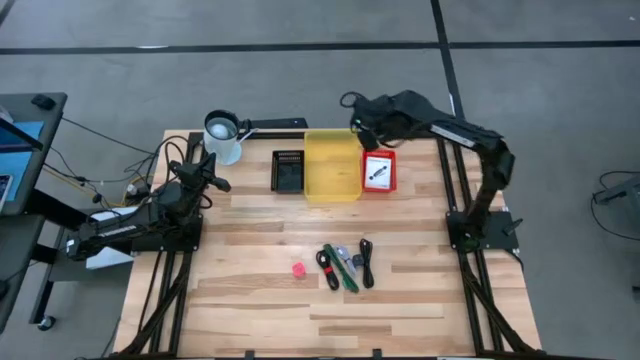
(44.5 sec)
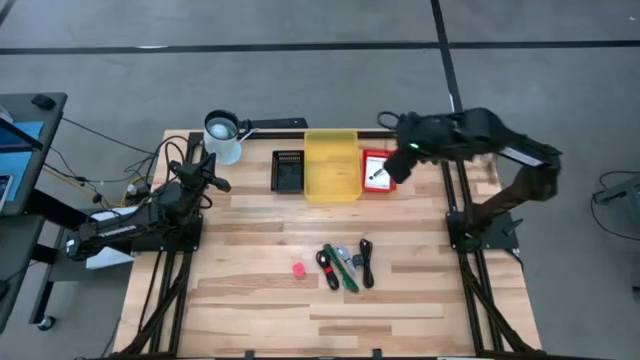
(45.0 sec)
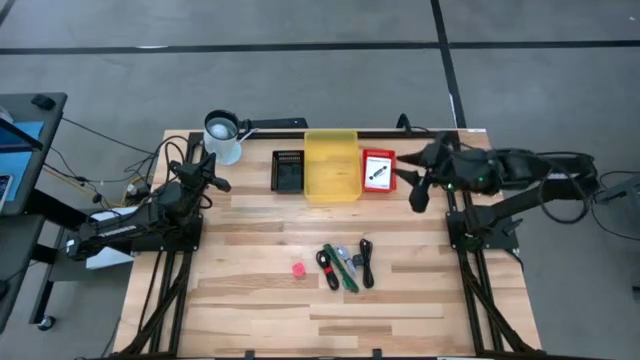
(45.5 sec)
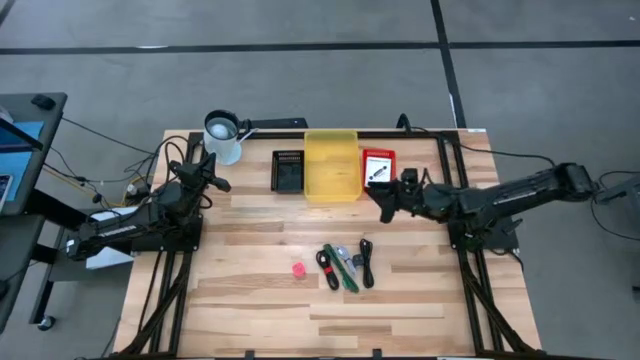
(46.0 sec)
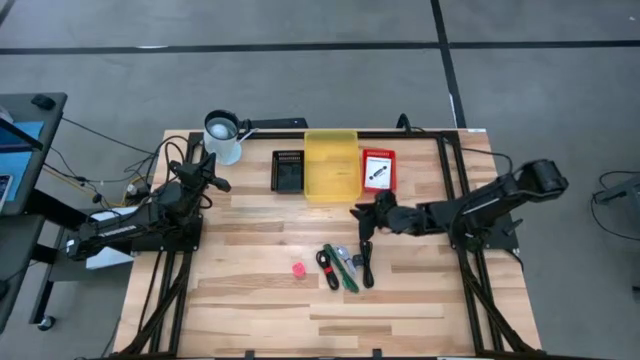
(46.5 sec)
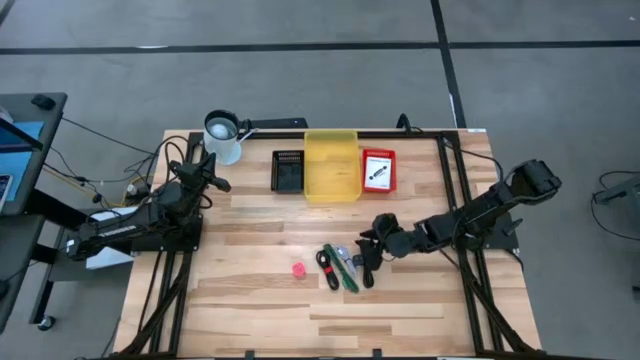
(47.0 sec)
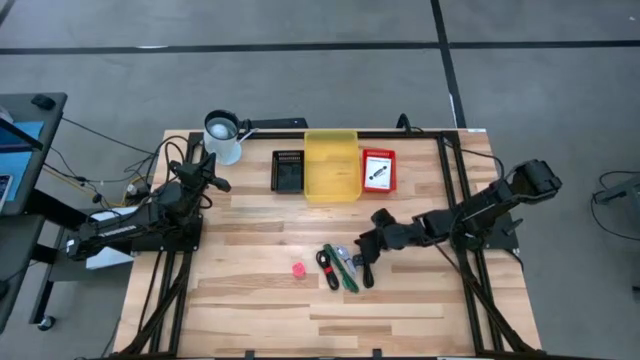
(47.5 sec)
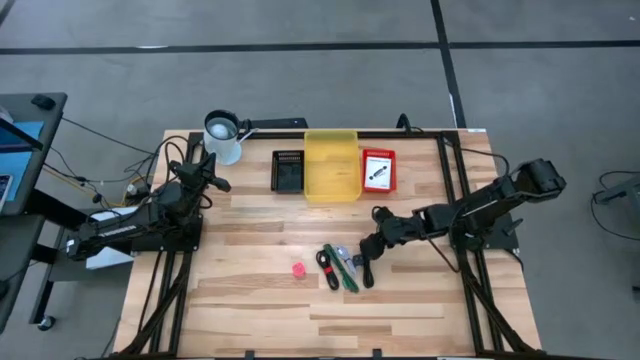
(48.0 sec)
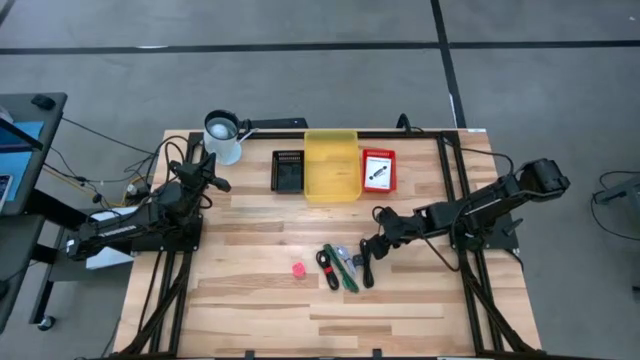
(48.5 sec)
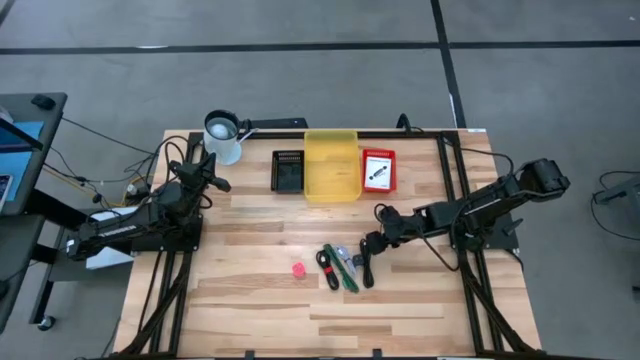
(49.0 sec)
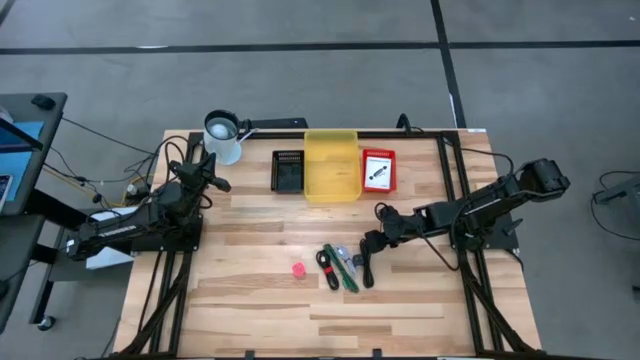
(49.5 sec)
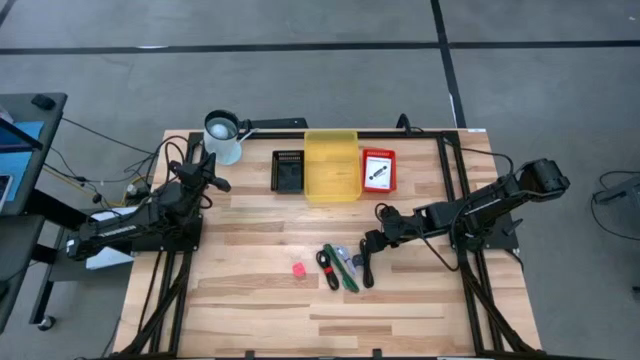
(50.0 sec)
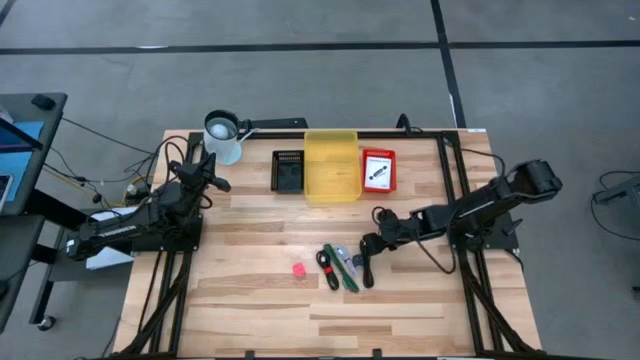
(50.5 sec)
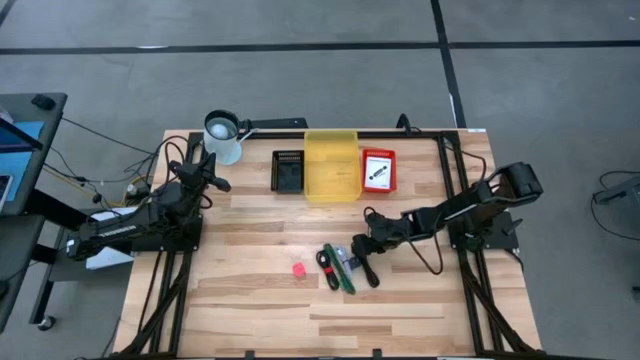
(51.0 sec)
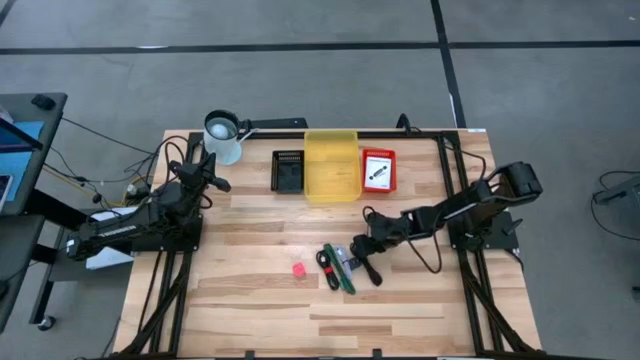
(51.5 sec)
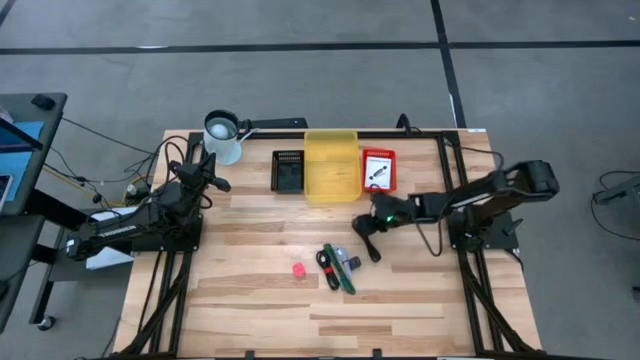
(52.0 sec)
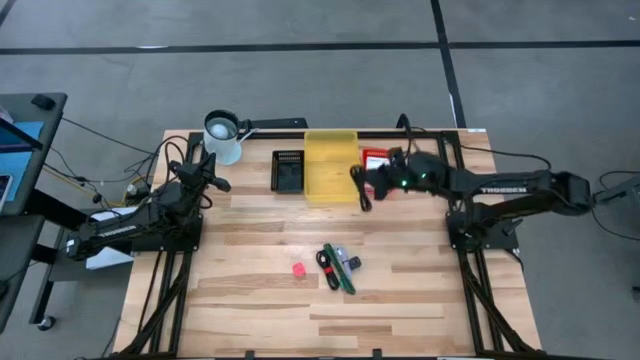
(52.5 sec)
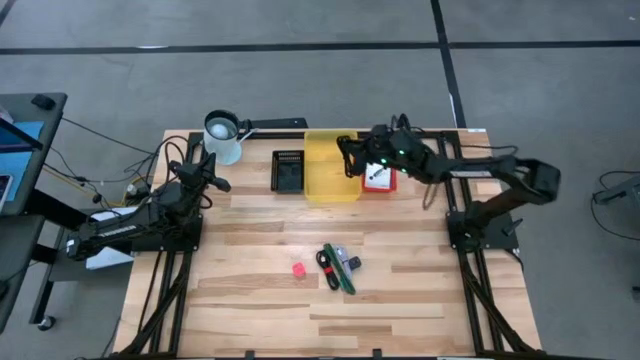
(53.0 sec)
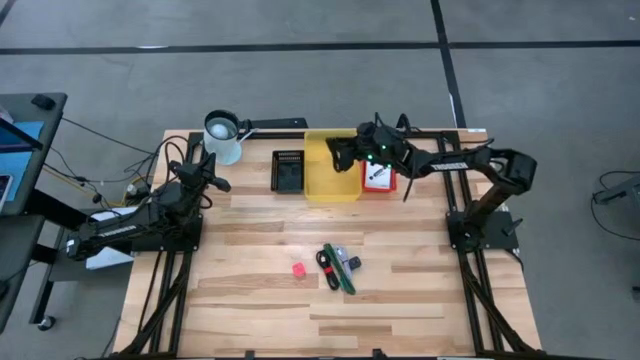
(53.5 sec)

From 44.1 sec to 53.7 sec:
Task: Pick and place items into bin
Put the black charger cable into the yellow bin

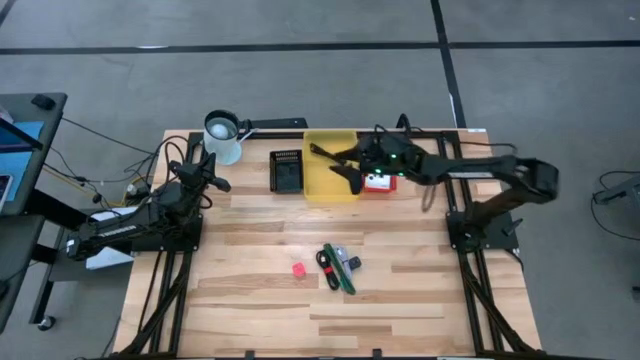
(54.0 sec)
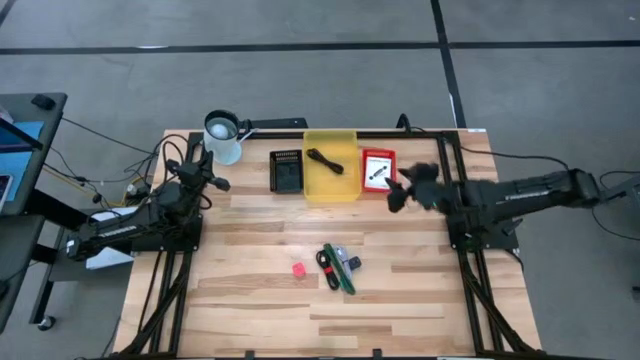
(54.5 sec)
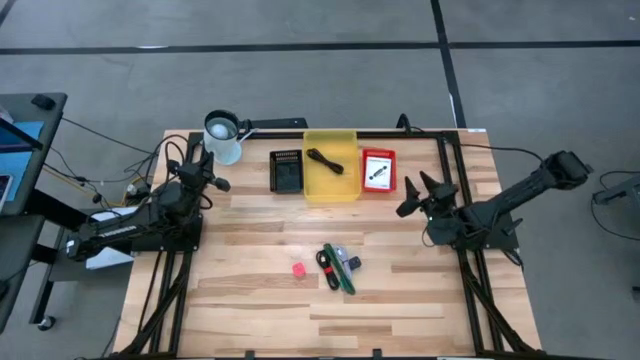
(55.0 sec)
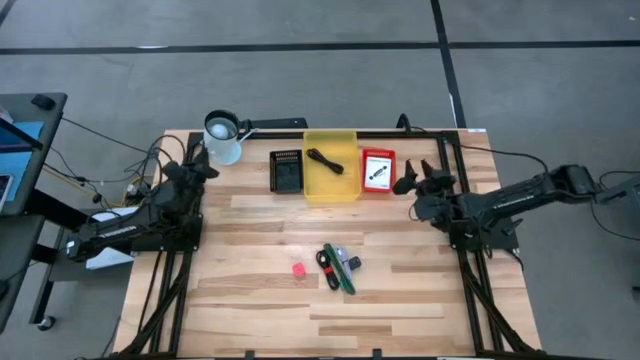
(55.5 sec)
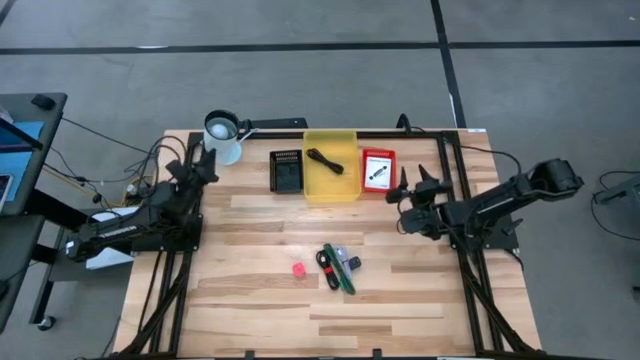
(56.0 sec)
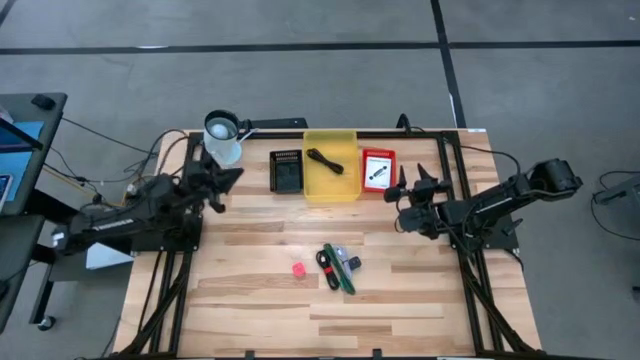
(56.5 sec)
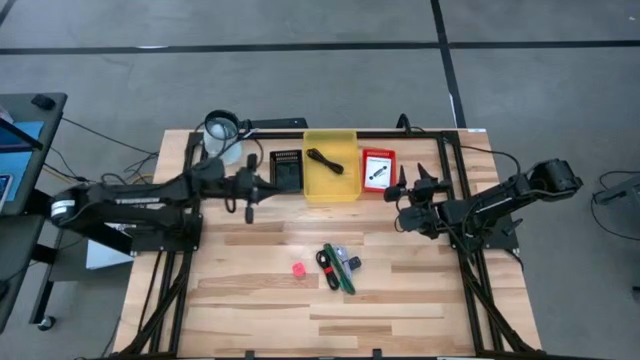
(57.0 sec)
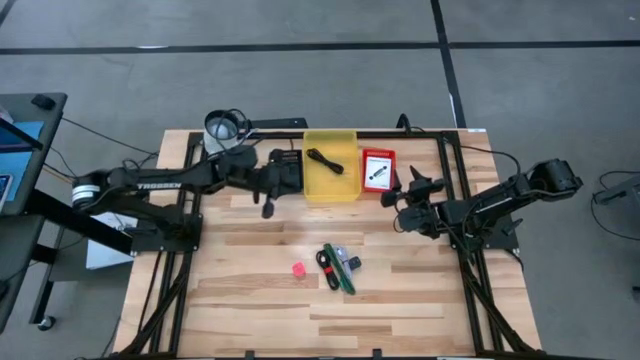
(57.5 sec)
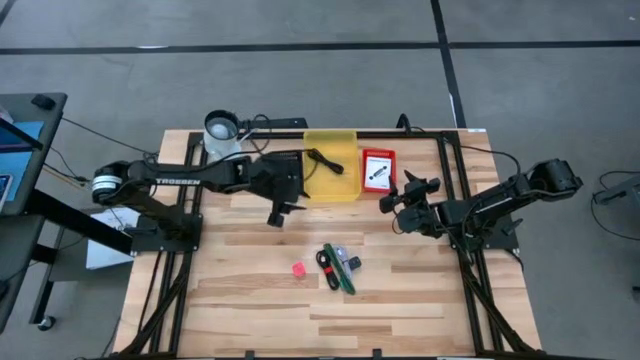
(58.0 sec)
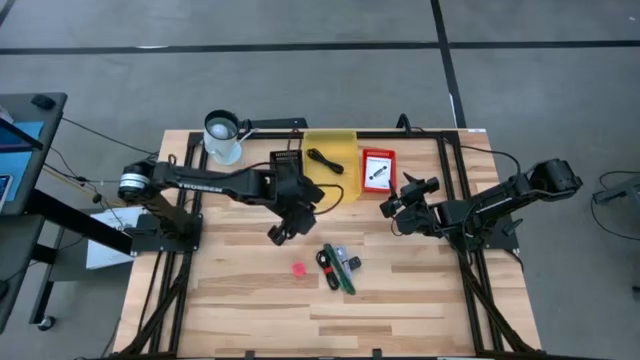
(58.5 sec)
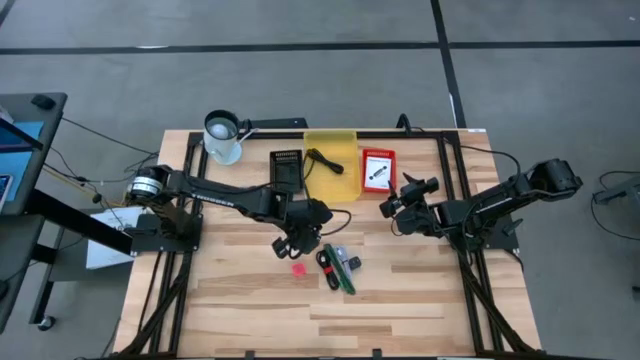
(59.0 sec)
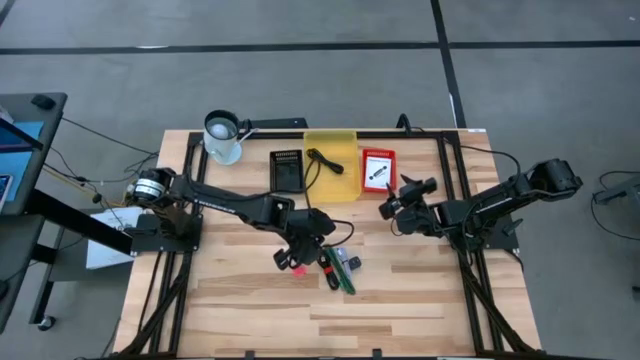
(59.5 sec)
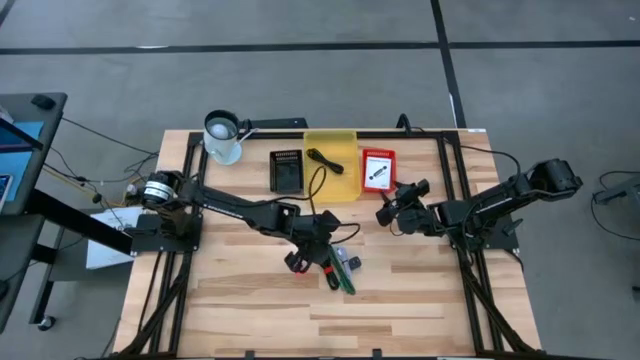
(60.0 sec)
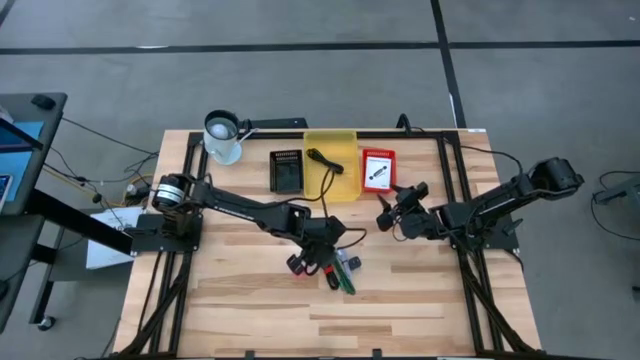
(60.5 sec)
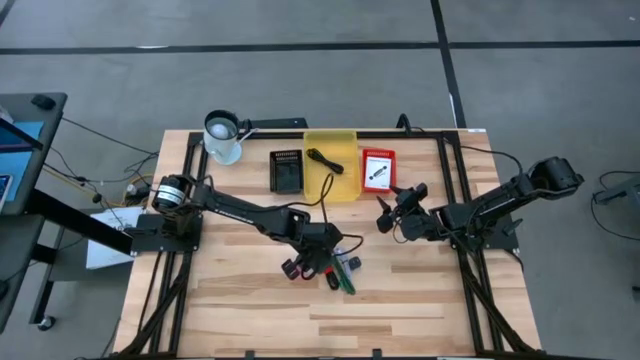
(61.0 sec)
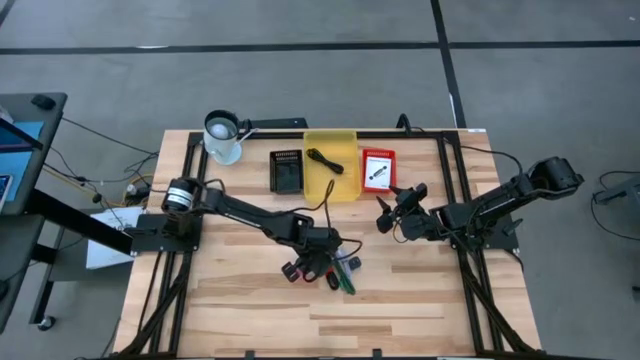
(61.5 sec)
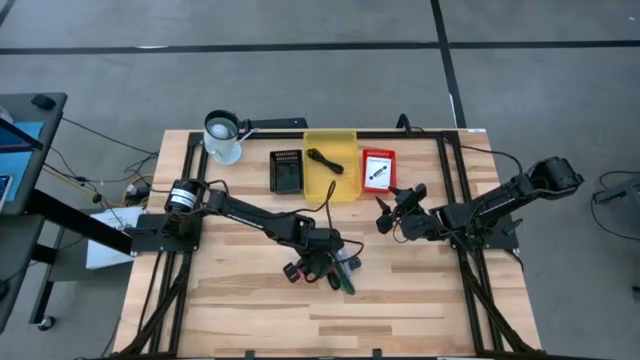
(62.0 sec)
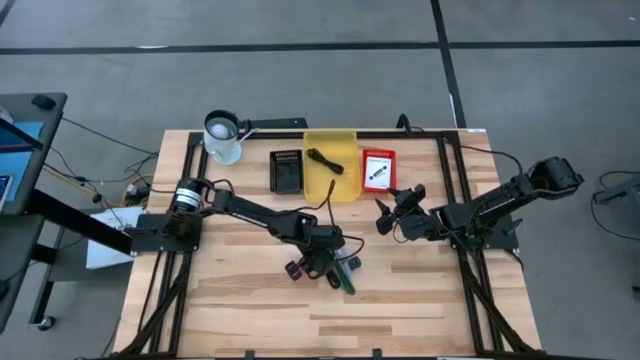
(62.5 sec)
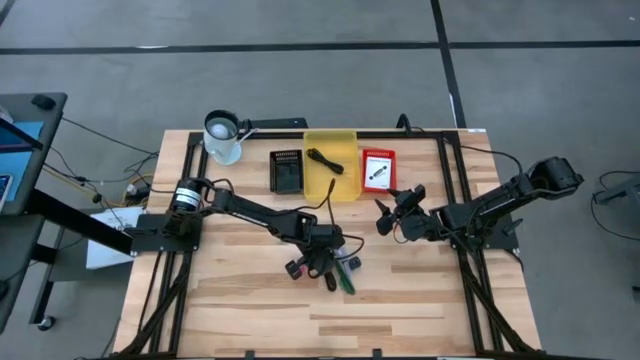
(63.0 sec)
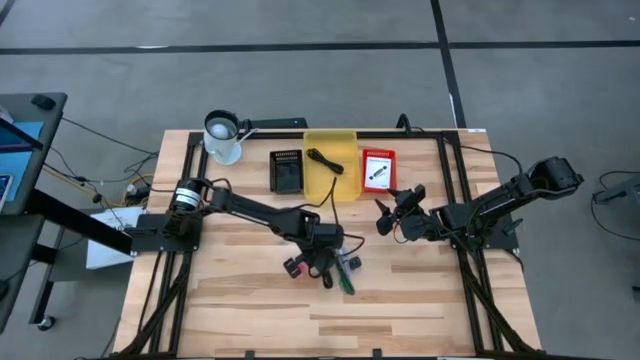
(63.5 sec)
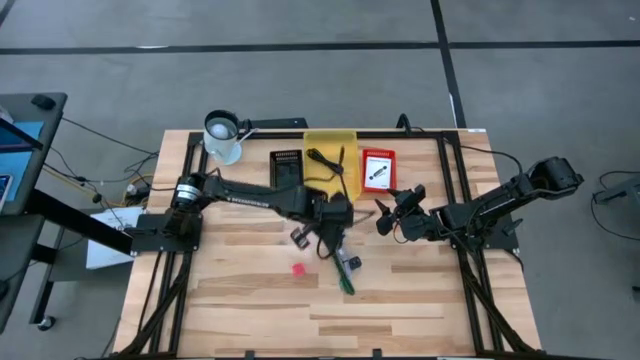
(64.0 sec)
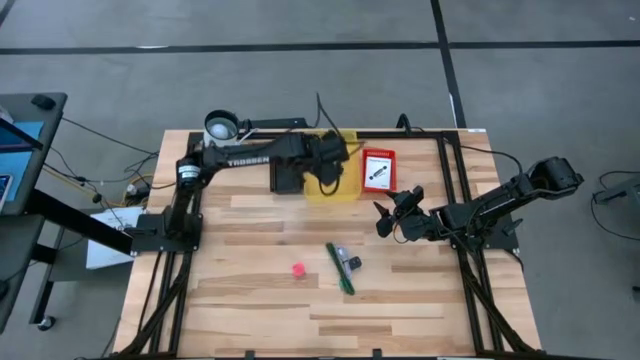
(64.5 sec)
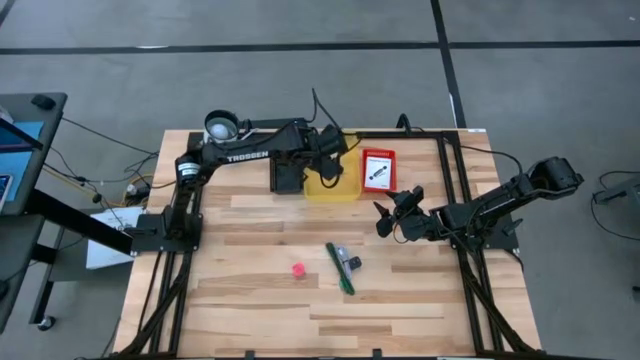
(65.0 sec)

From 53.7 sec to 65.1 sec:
Put the black charger cable into the yellow bin
